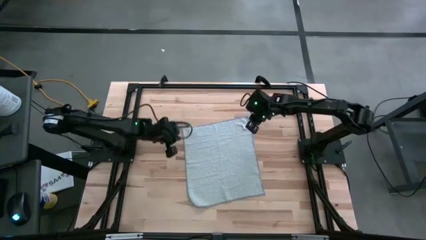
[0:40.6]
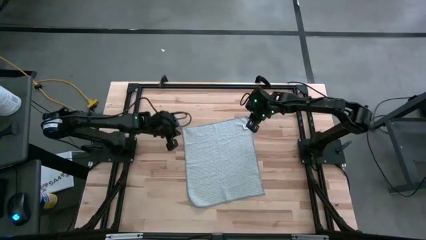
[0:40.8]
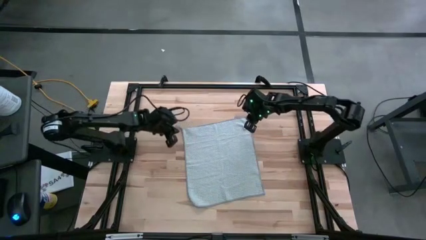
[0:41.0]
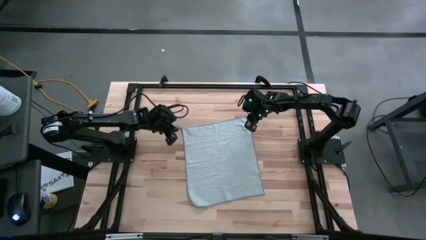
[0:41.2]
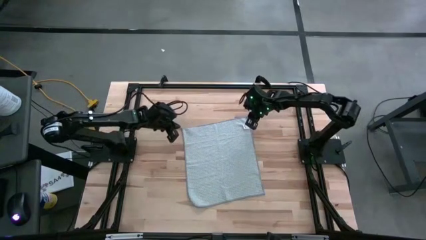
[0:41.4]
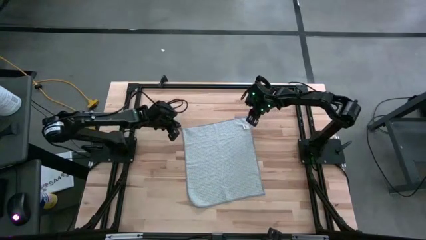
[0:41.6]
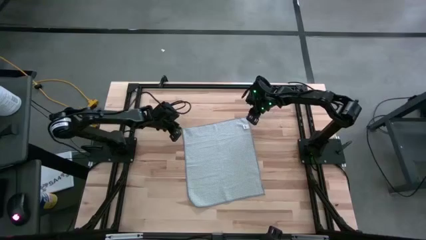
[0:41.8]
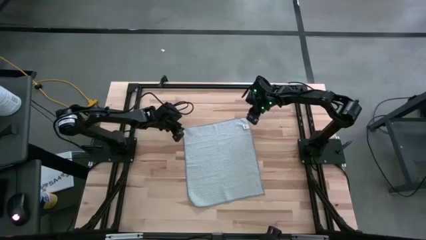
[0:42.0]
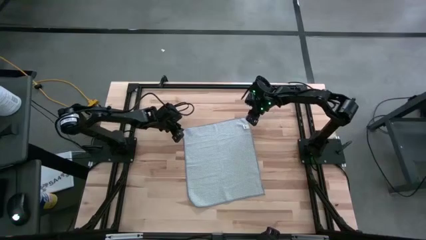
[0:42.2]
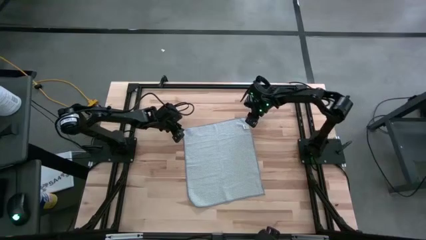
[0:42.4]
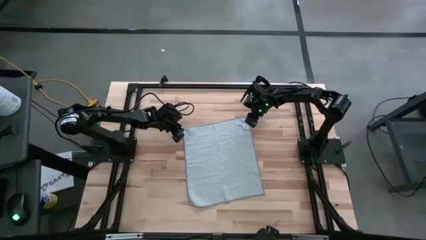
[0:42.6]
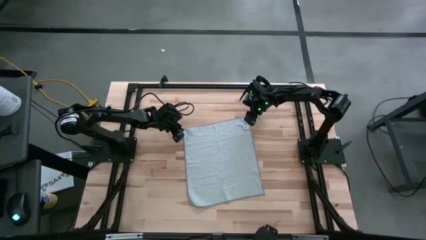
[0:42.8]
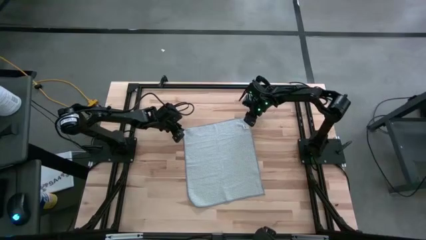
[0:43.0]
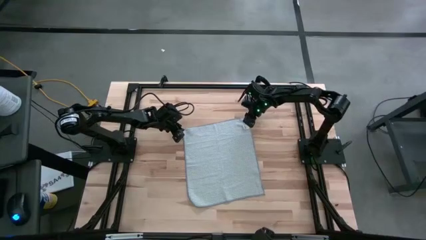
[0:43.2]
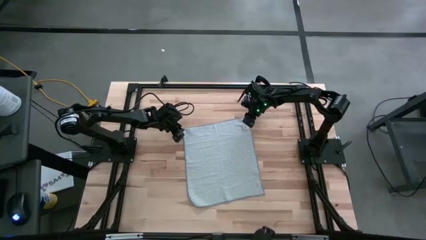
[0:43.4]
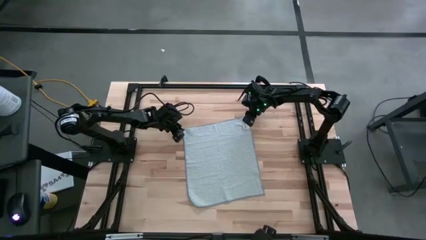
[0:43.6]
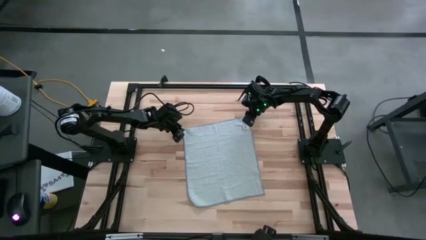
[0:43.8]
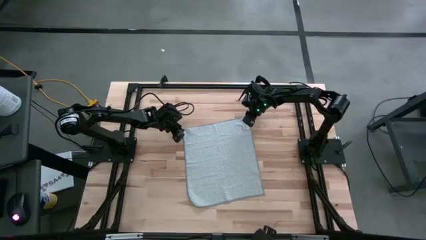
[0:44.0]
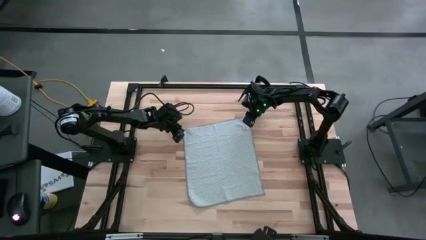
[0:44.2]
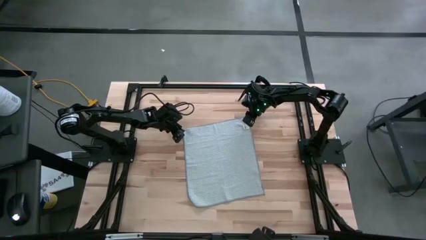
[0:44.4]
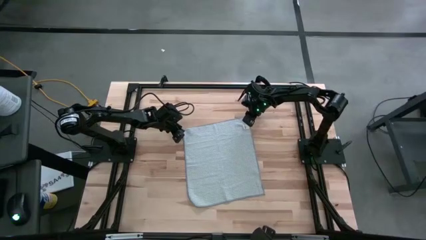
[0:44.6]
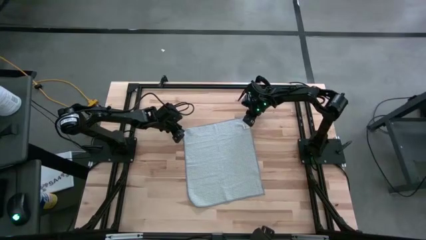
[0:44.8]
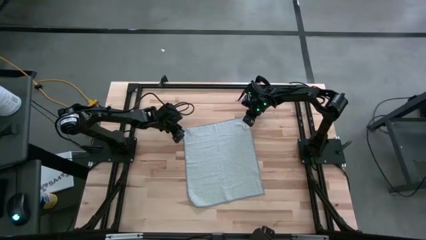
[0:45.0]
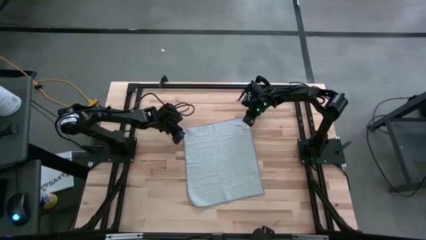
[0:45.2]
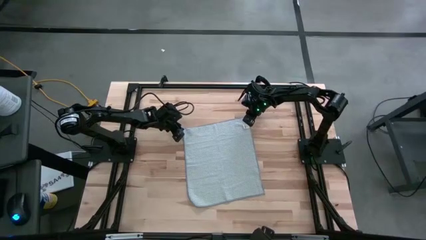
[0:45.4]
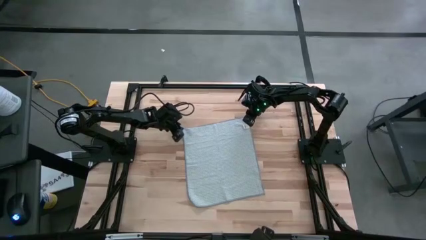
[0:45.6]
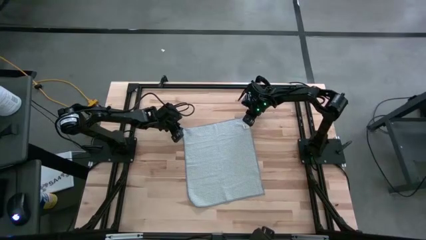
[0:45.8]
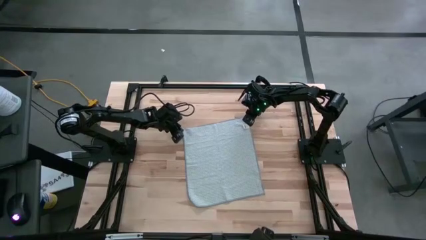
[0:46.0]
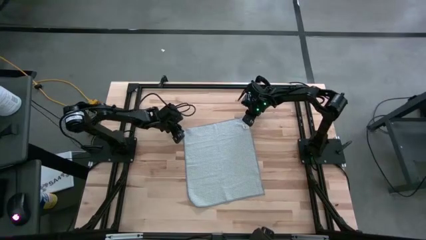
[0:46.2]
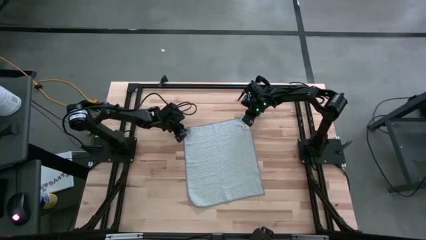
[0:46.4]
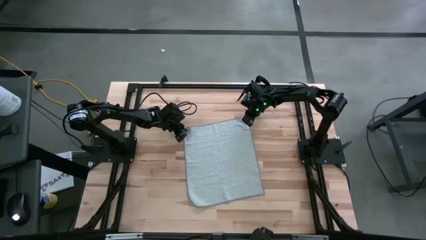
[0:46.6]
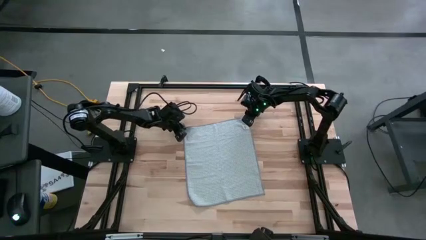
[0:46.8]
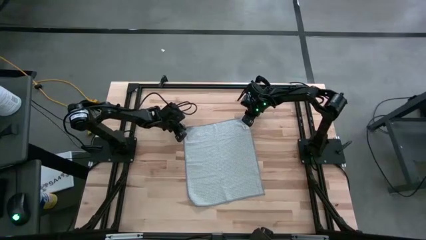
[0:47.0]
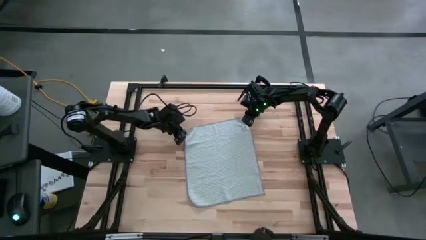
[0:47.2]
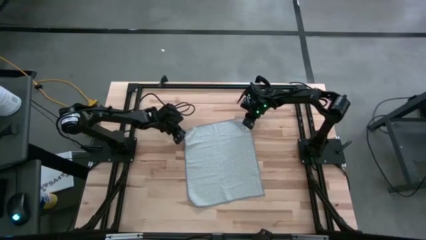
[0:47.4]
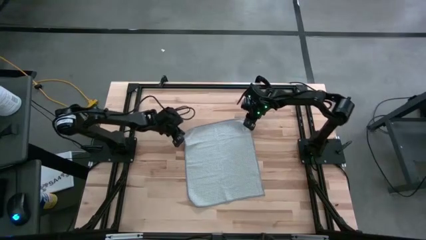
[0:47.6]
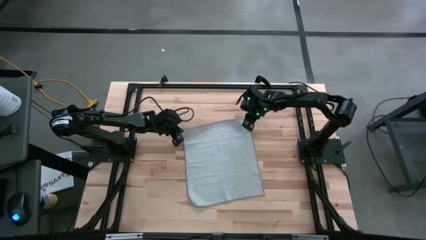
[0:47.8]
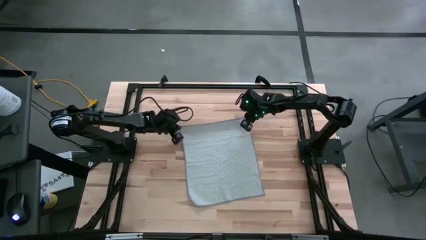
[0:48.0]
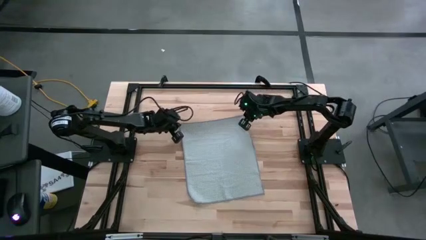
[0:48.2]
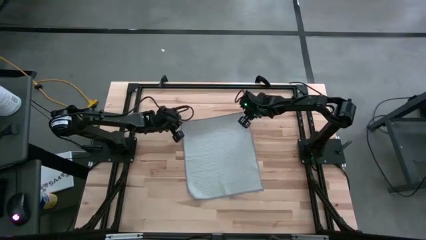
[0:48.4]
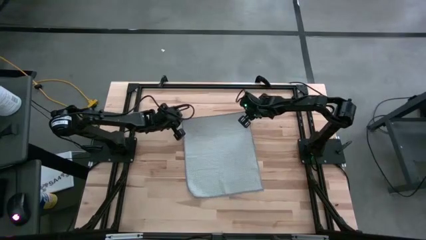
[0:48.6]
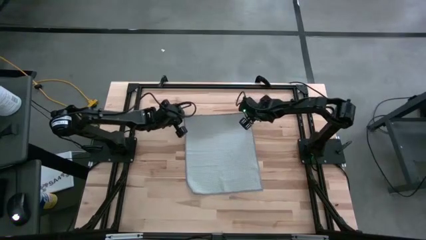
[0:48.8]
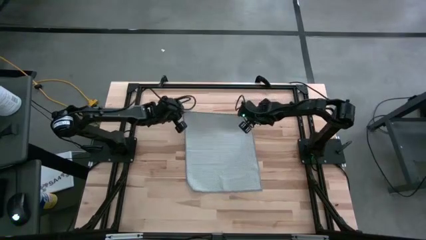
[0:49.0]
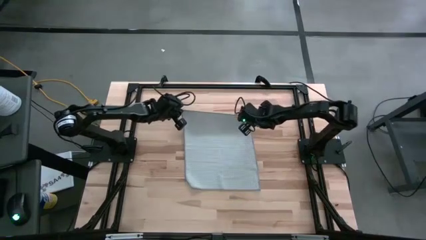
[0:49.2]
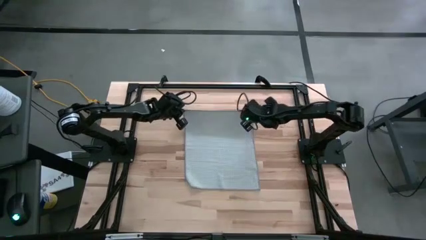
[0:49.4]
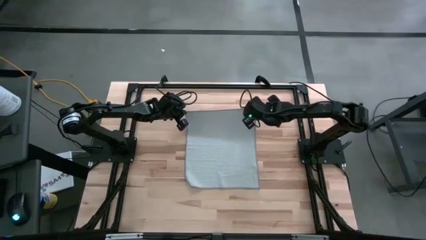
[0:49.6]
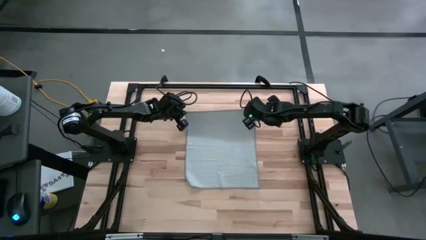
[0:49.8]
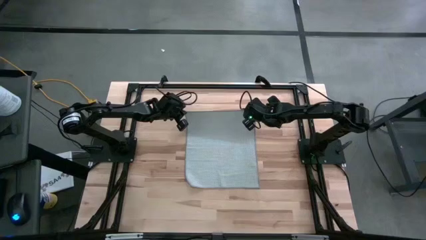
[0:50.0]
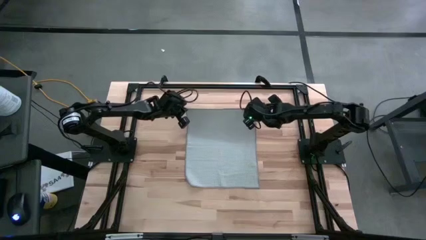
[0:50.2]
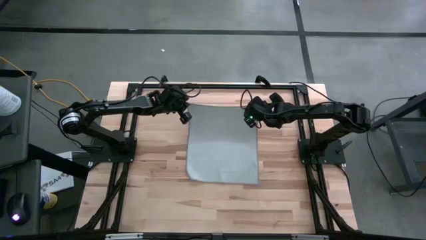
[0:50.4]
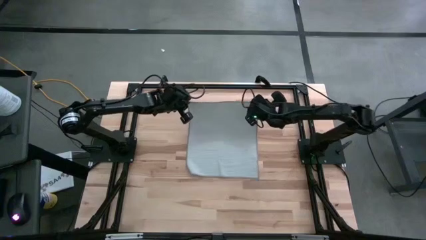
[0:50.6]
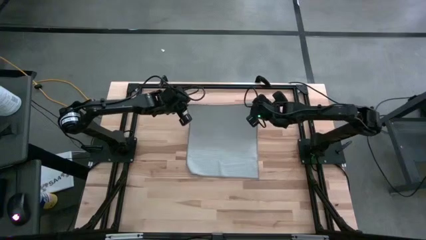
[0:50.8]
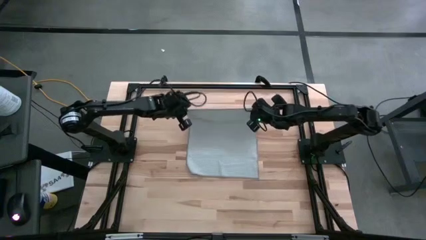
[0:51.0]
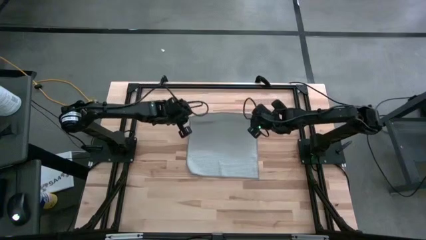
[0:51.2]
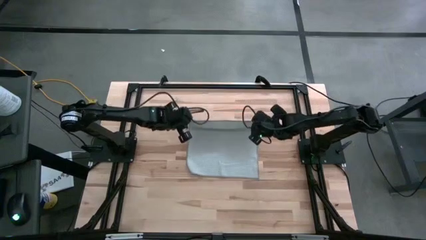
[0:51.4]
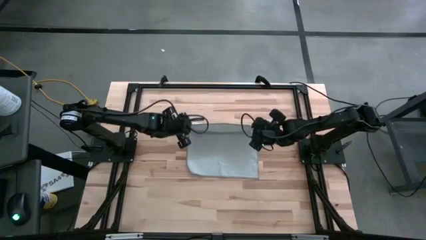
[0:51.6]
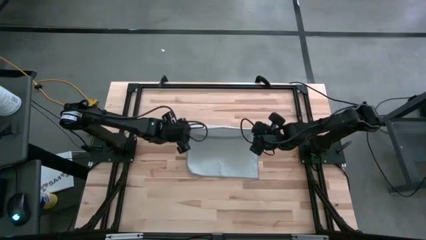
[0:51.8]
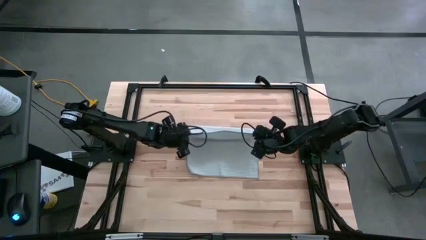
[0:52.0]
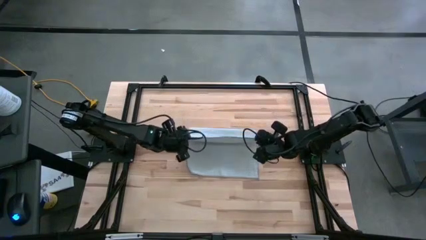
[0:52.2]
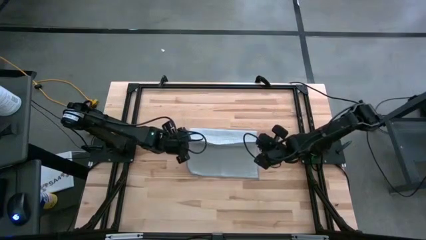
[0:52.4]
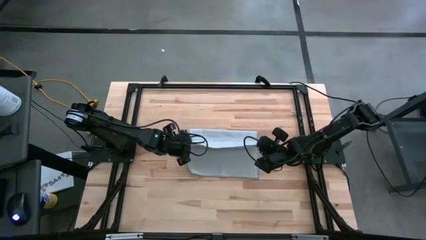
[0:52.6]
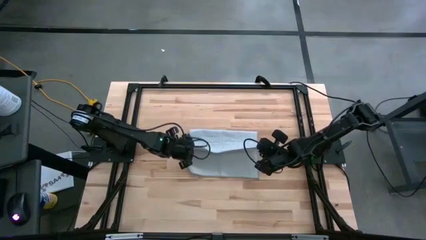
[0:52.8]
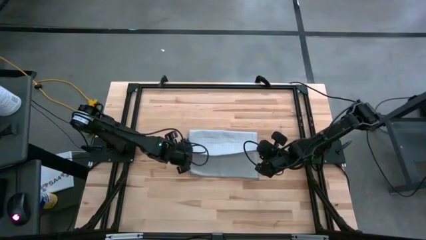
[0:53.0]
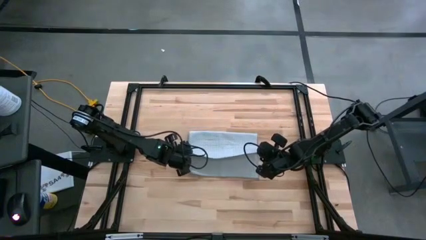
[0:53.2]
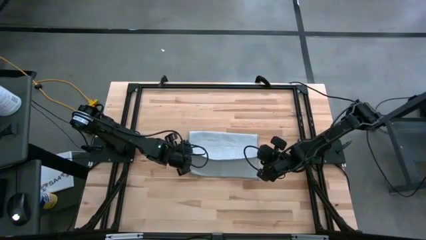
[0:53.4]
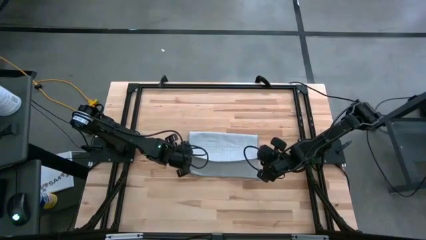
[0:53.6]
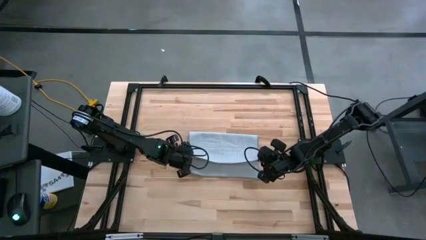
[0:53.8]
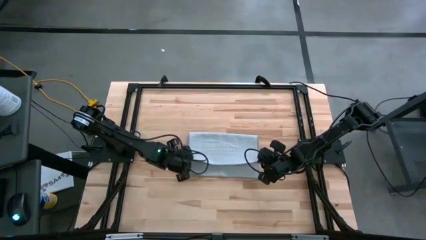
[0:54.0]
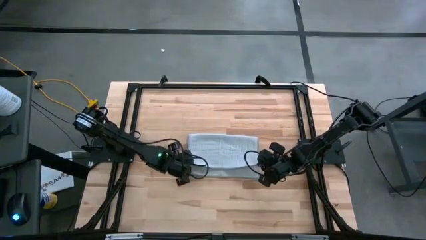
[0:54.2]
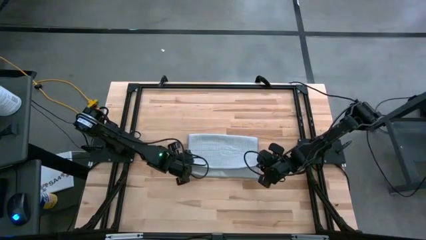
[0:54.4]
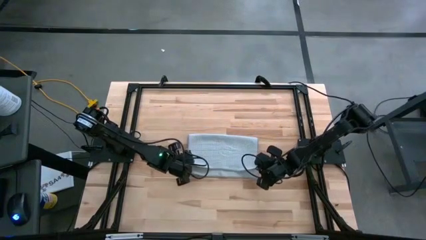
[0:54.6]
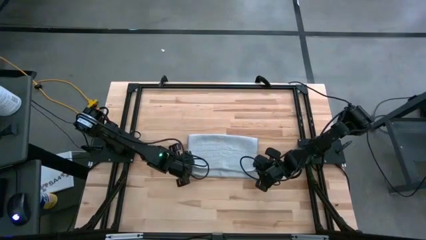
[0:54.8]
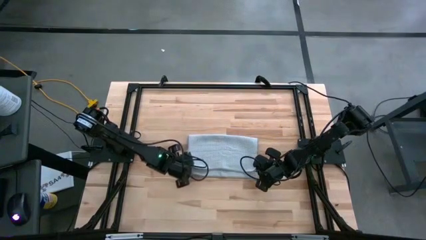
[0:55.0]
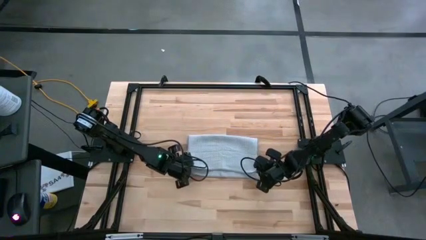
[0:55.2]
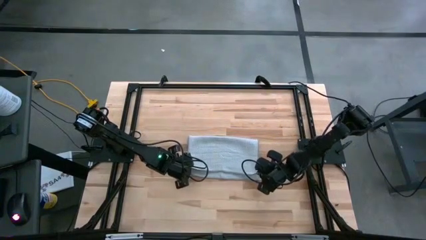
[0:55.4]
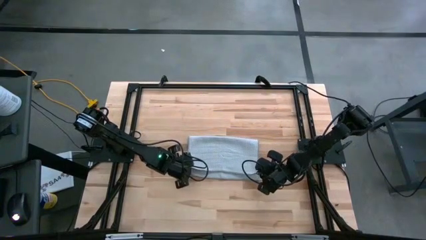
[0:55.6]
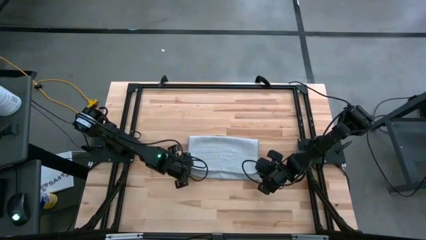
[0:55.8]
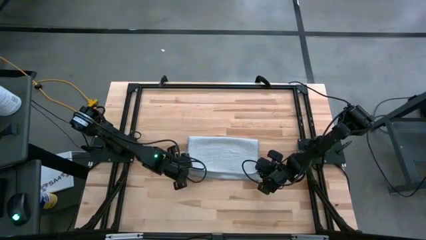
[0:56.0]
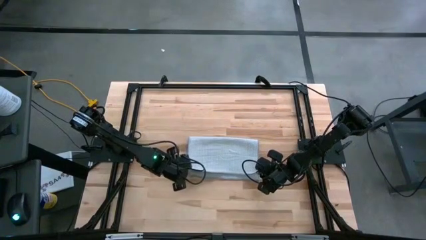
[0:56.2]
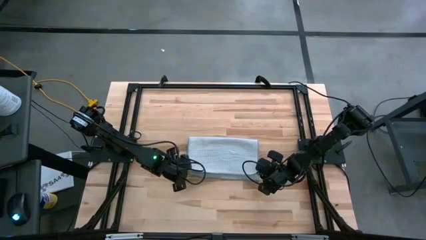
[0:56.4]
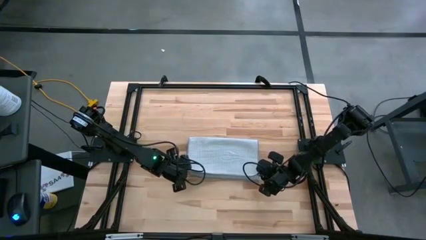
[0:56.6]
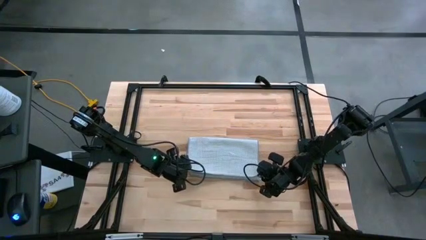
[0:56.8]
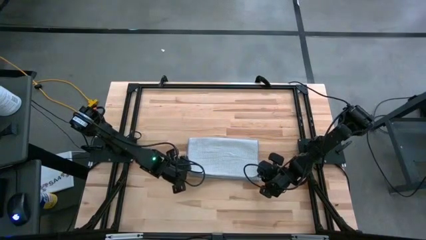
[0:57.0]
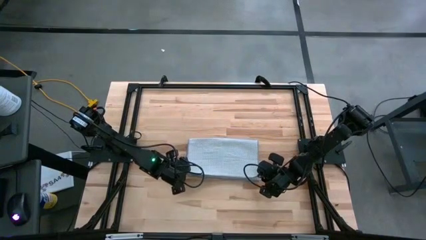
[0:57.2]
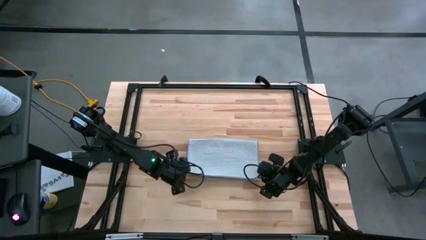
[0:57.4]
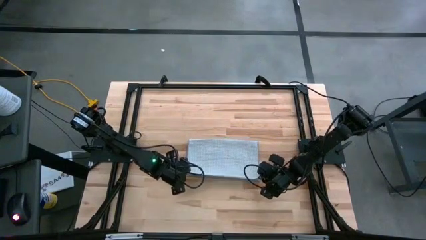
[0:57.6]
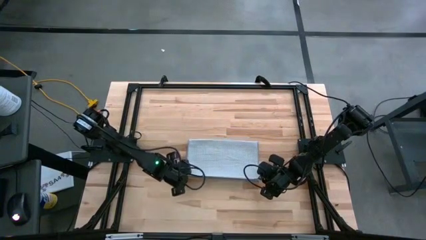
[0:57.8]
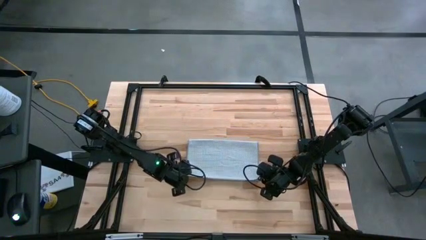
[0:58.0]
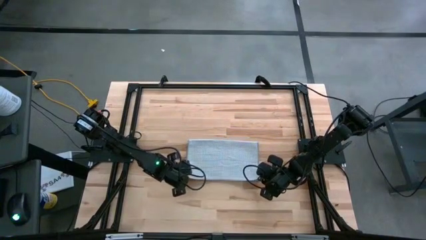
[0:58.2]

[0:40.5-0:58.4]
Task: Fold microfiber towels
Fold the gray towel on the table
